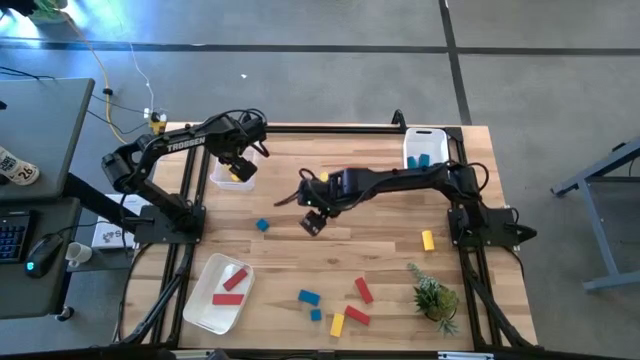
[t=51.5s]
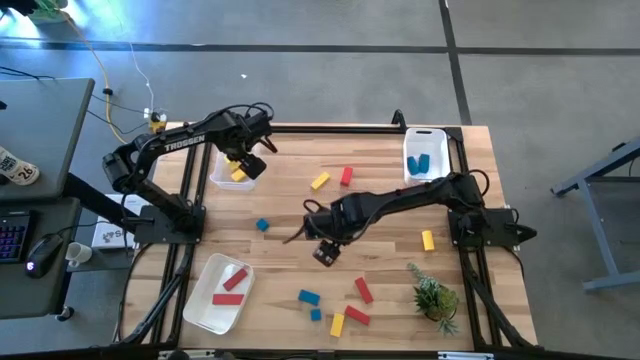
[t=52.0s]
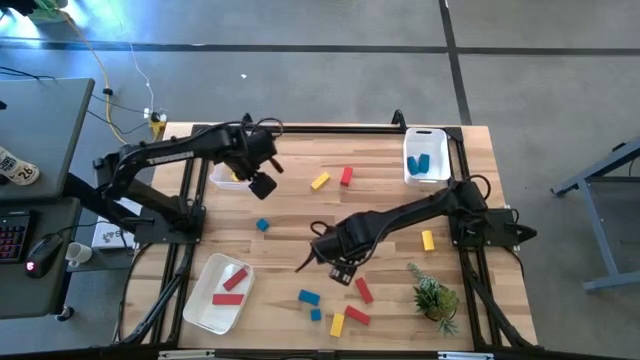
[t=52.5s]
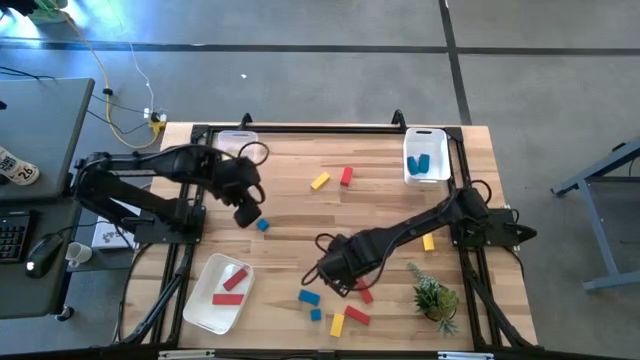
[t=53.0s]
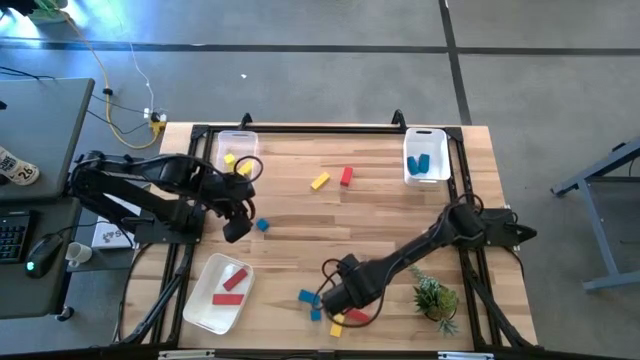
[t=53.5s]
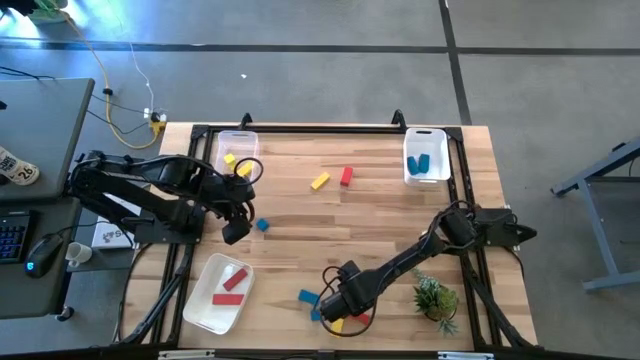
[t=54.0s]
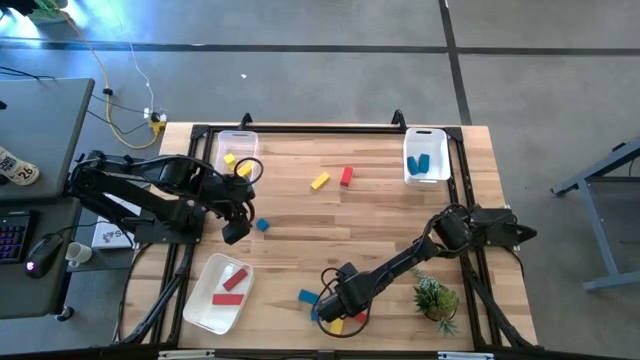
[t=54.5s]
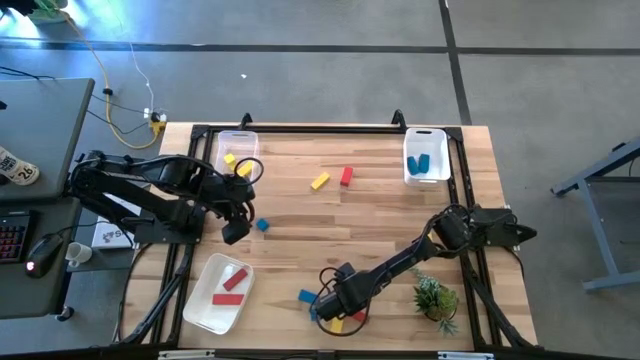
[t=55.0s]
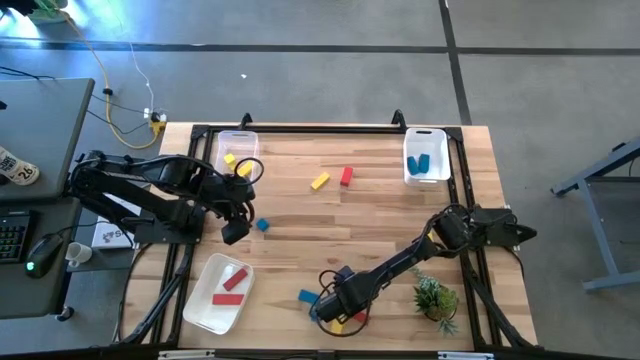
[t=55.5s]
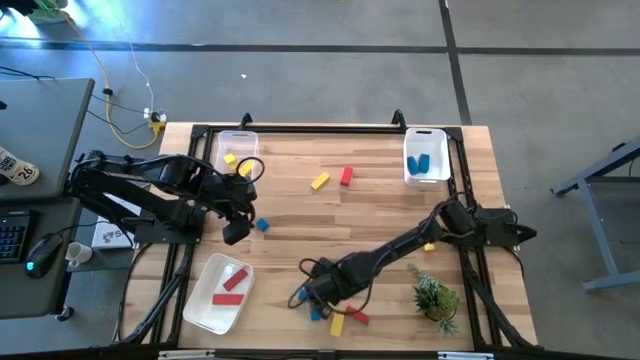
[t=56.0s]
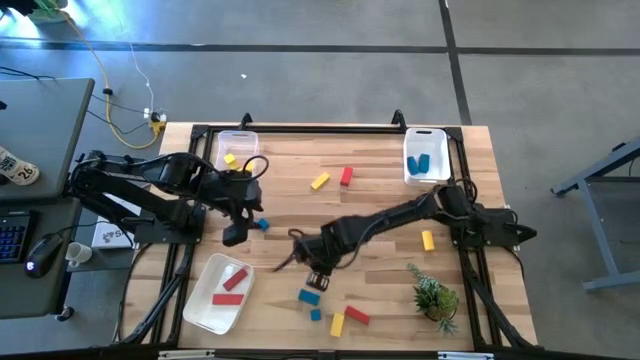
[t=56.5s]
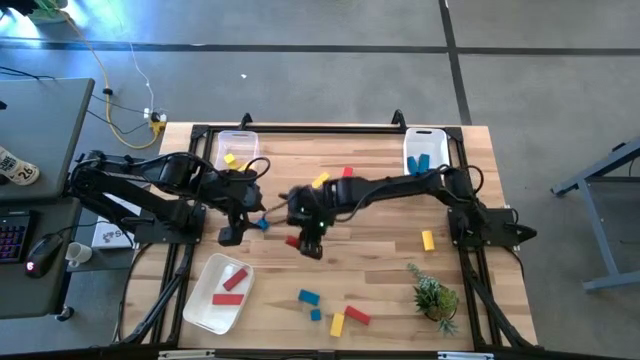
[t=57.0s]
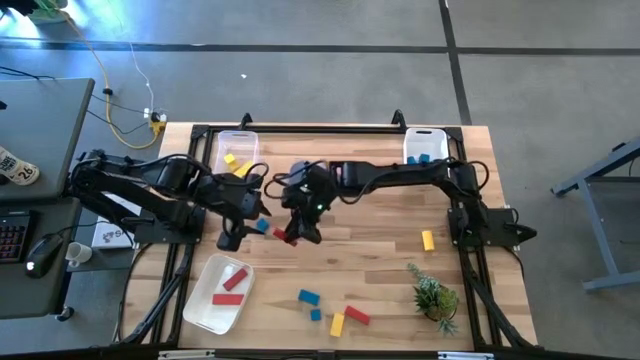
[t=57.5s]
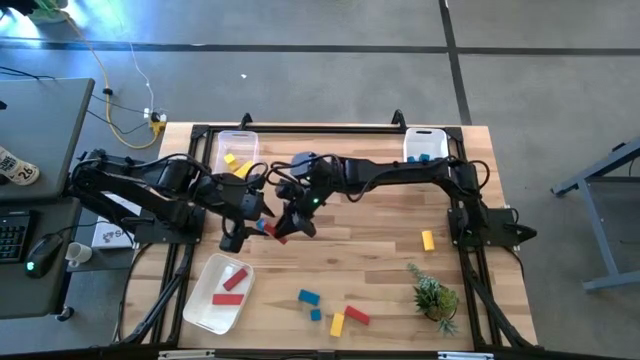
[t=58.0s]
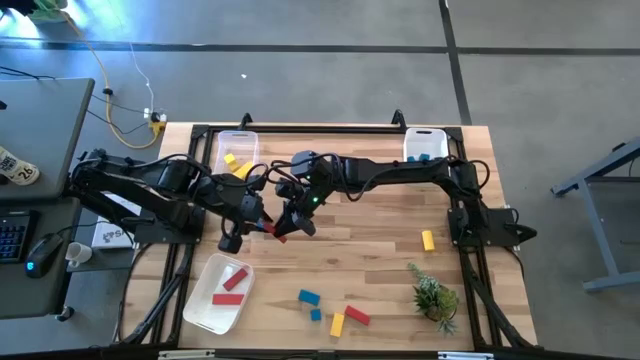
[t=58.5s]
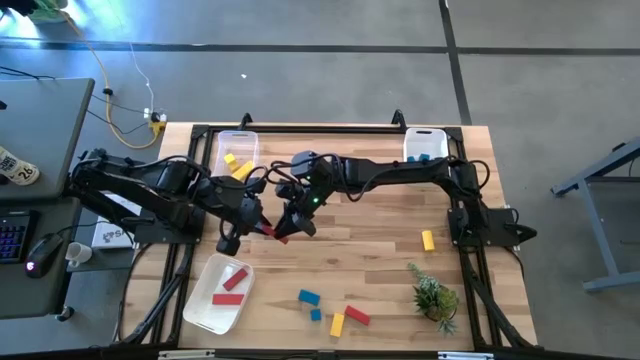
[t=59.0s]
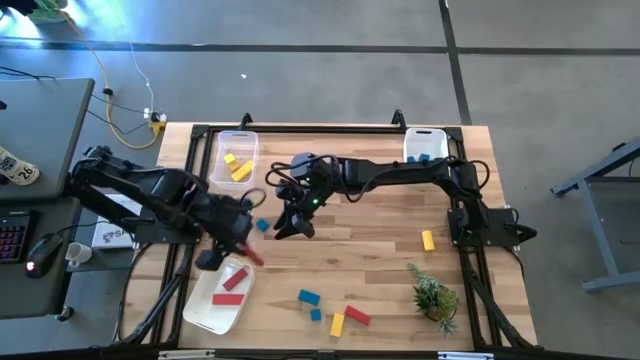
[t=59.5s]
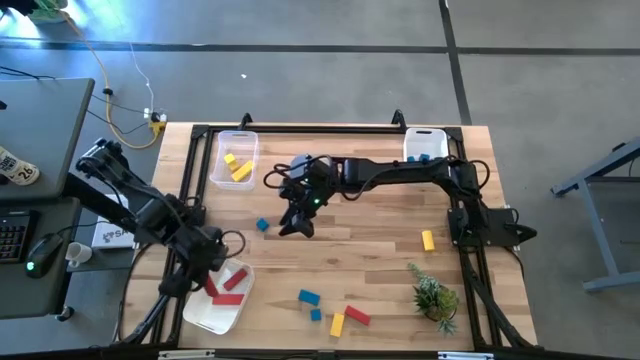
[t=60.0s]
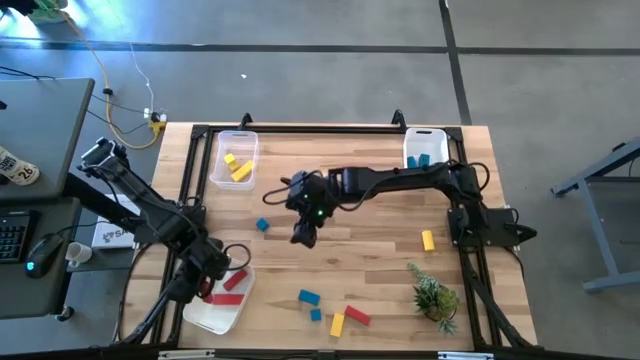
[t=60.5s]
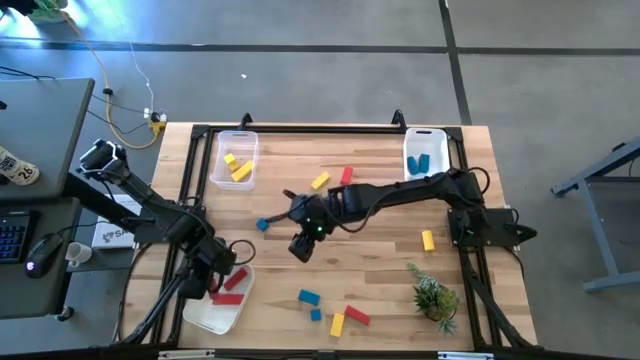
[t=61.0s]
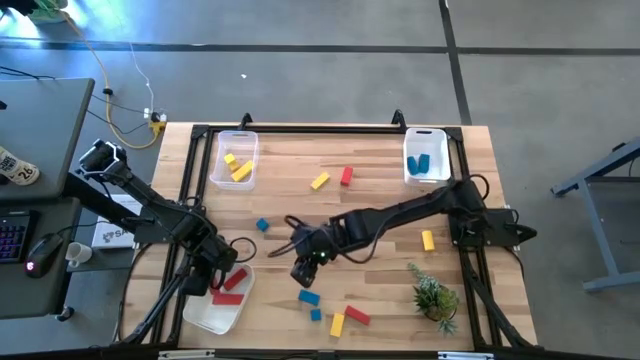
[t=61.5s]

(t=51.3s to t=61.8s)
Task: Sort & place blocks by color
Put the red block into the bottom white bin

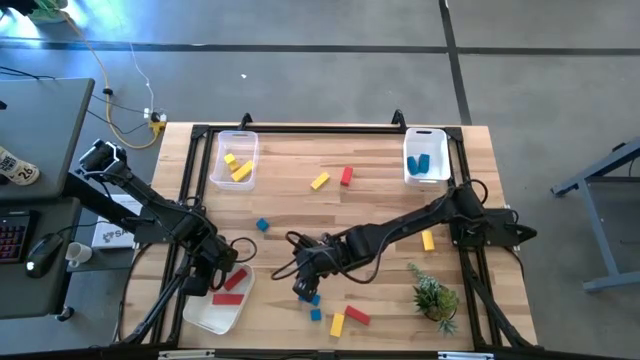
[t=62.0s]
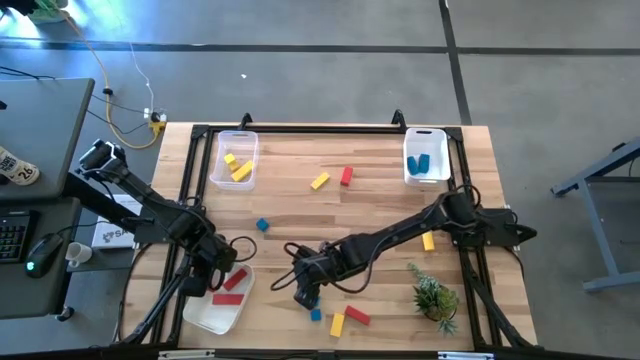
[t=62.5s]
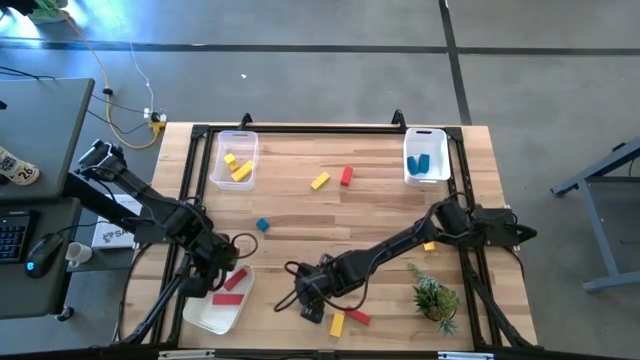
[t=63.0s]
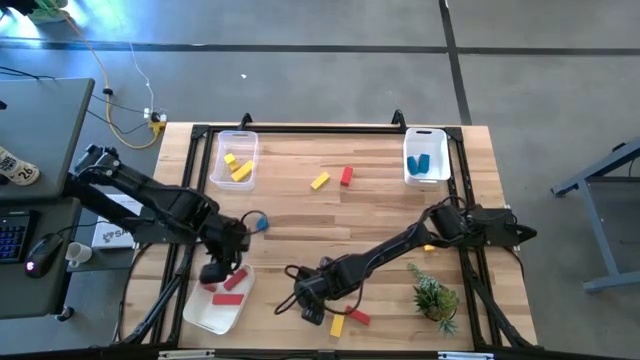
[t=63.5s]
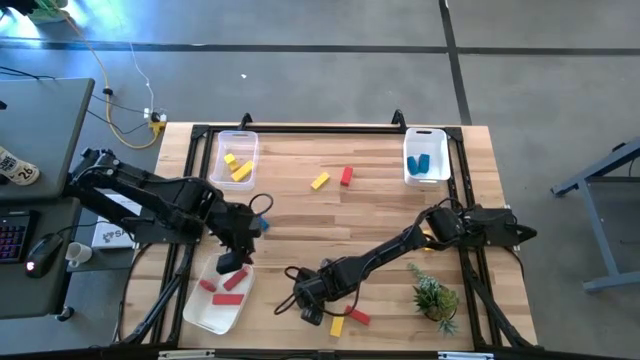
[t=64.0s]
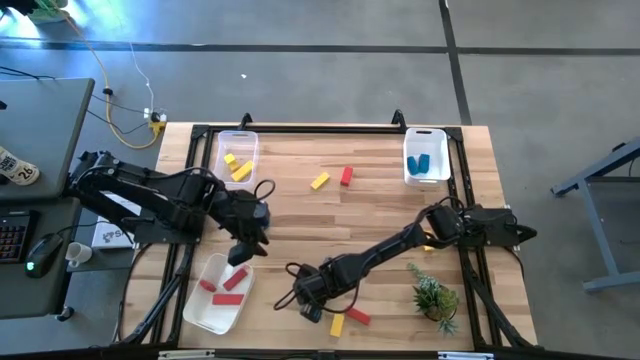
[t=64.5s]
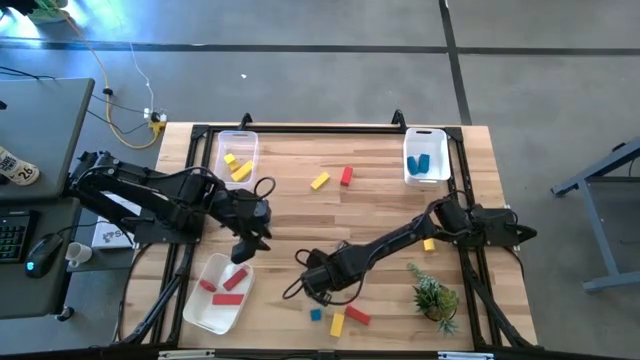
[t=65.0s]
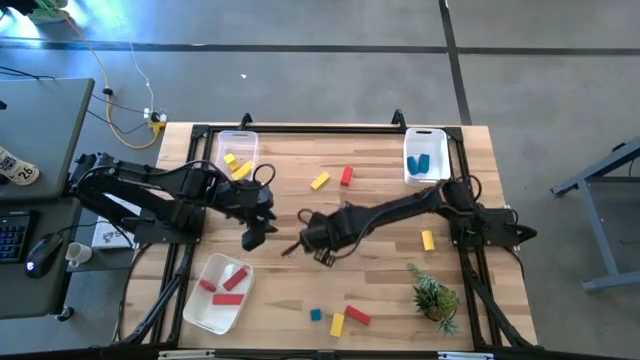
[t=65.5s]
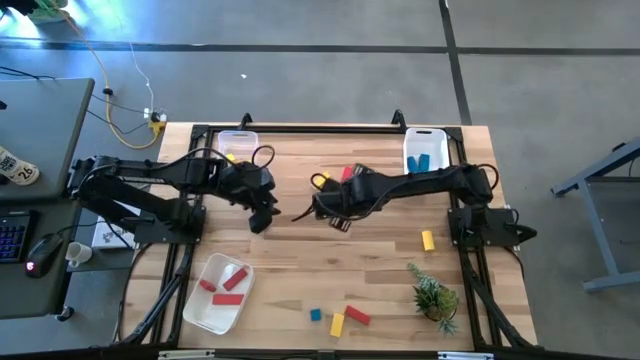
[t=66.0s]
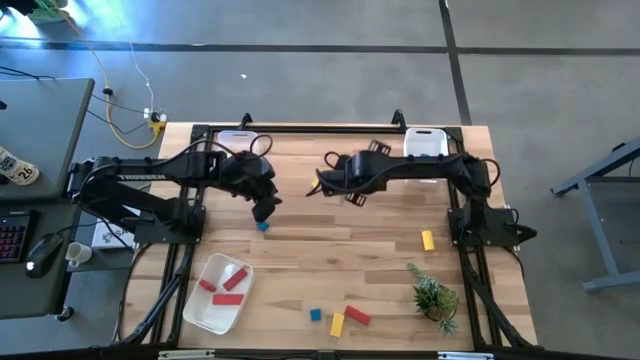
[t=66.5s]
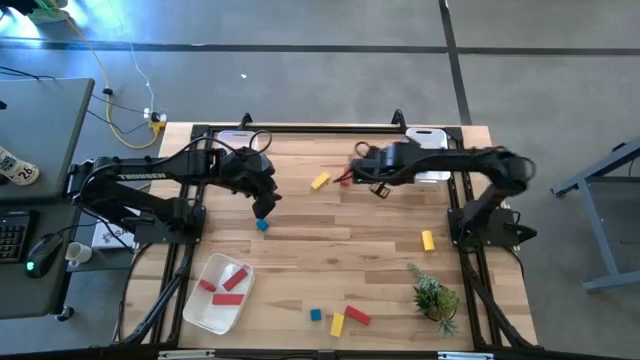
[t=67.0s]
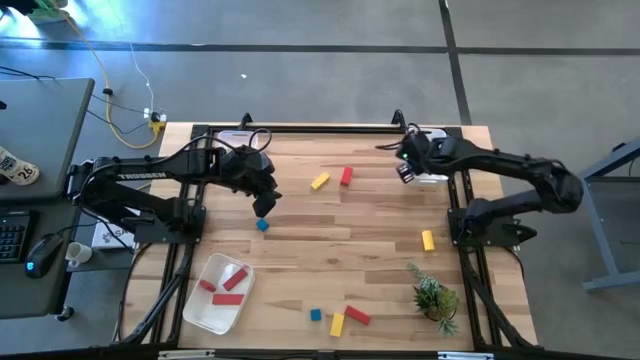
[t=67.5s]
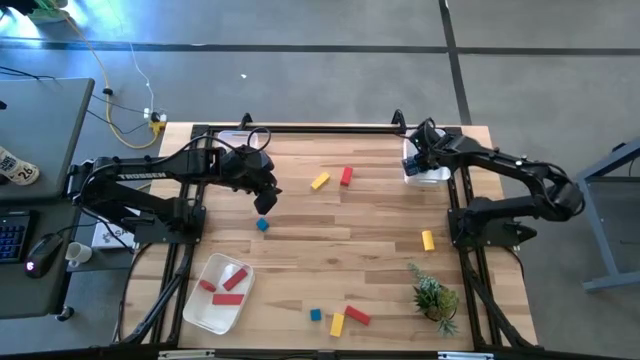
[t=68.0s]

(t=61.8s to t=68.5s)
Put the blue block into the top white bin

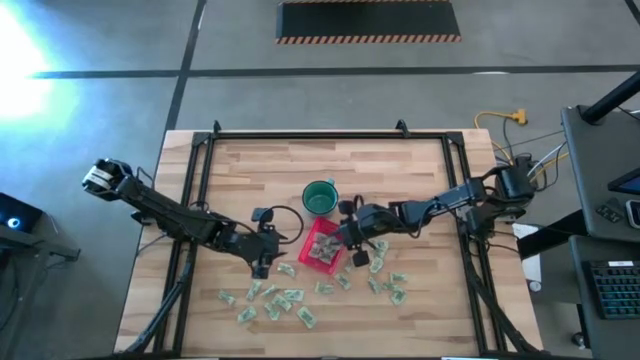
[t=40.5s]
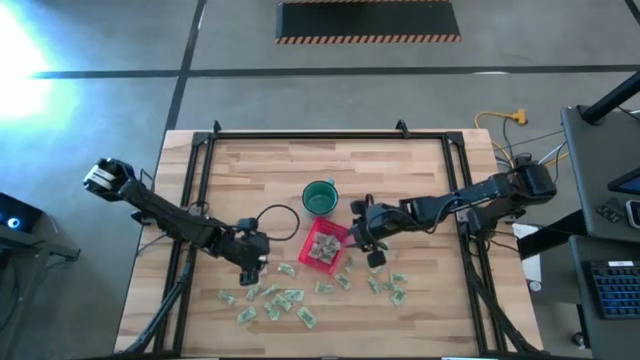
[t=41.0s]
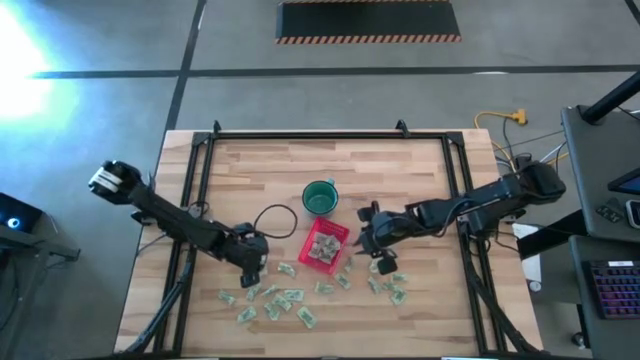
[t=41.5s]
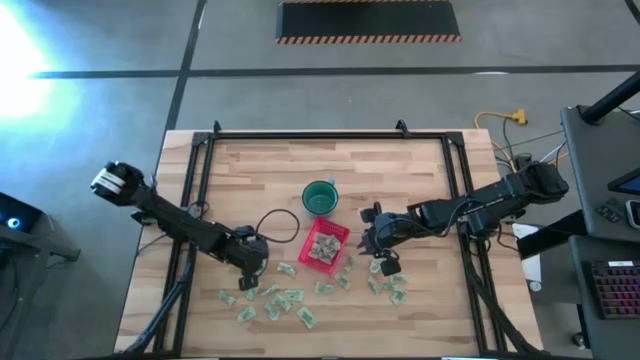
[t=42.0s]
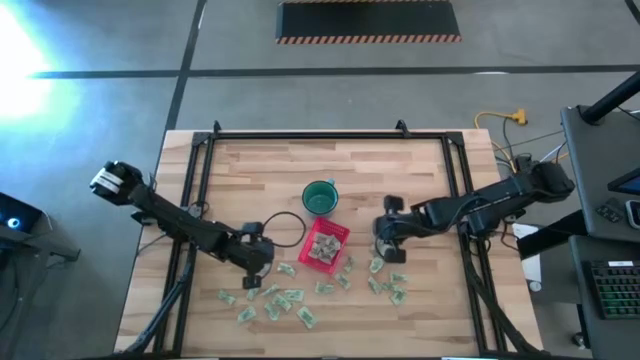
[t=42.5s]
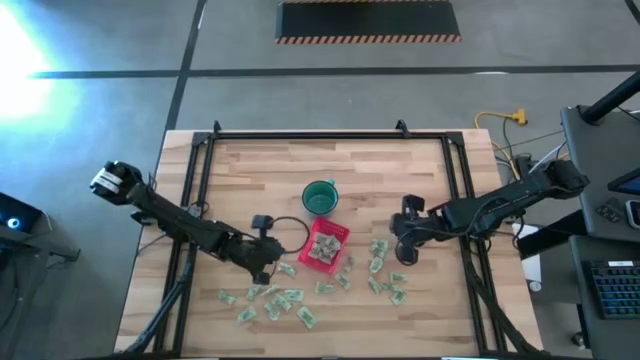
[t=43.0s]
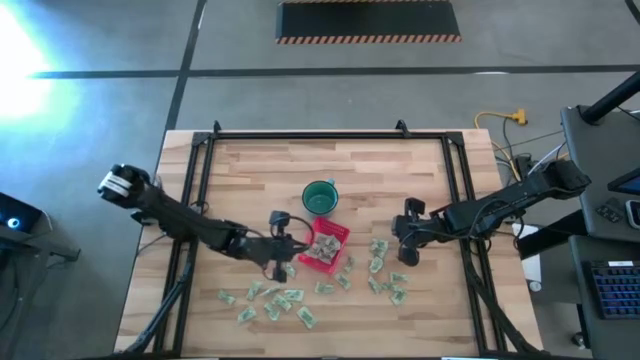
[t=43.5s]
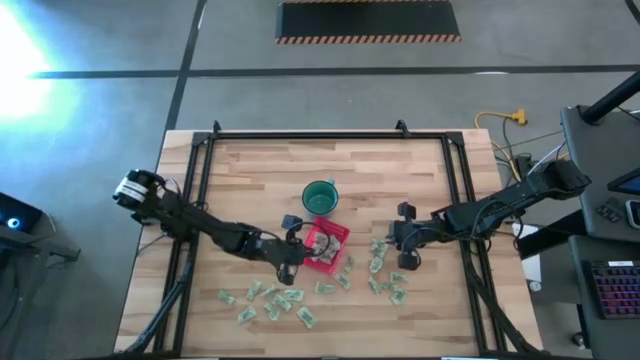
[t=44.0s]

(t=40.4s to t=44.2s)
Task: Pick and place items into bin
Put the light green stevia packet into the red bin
